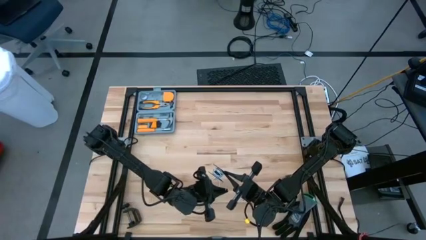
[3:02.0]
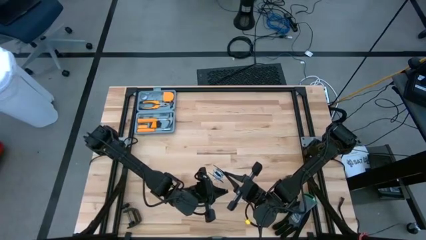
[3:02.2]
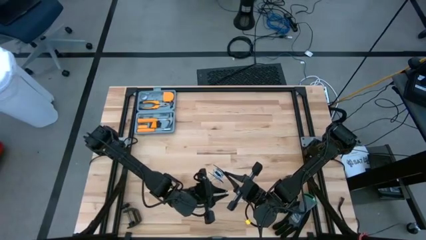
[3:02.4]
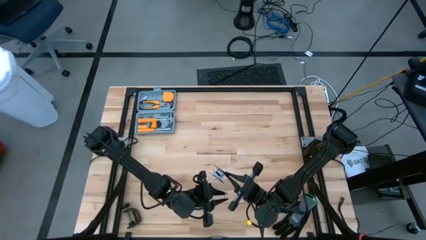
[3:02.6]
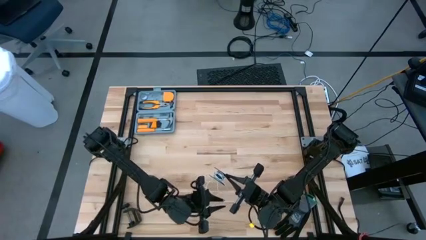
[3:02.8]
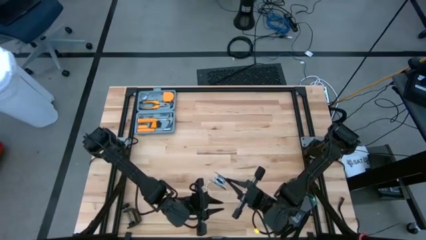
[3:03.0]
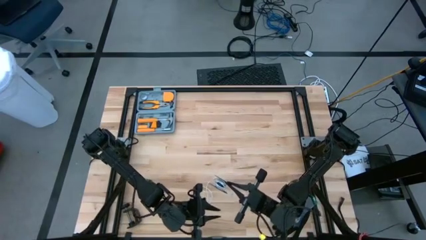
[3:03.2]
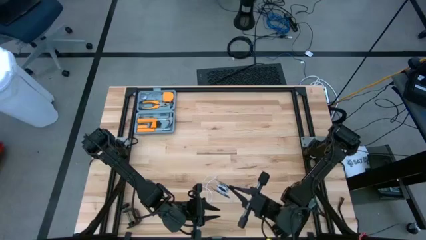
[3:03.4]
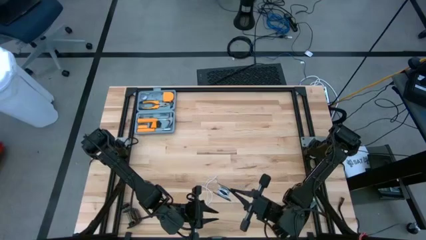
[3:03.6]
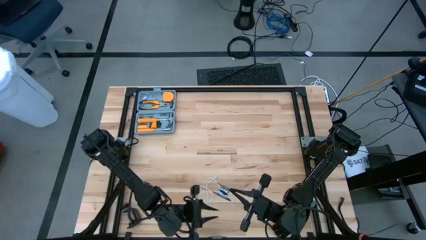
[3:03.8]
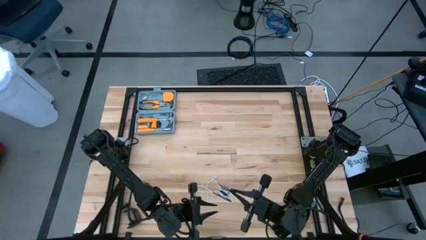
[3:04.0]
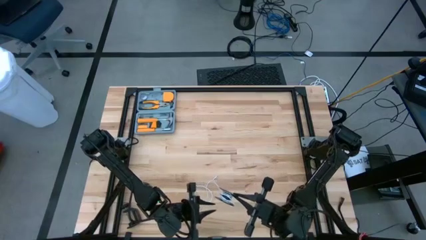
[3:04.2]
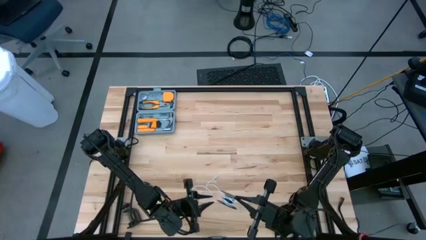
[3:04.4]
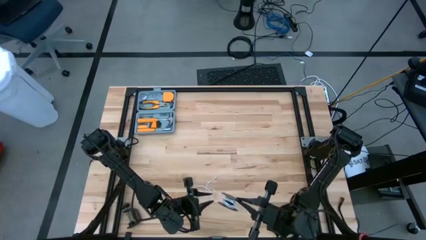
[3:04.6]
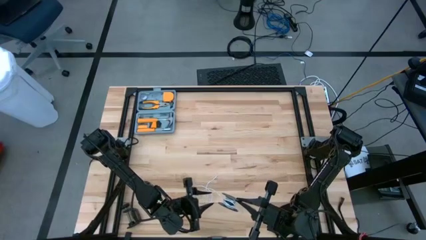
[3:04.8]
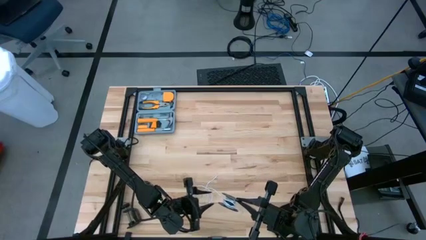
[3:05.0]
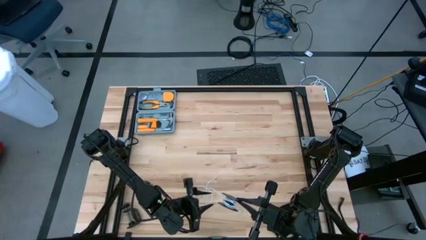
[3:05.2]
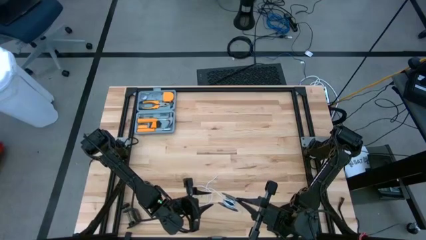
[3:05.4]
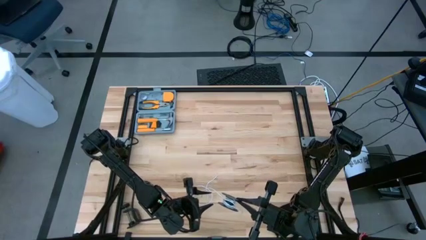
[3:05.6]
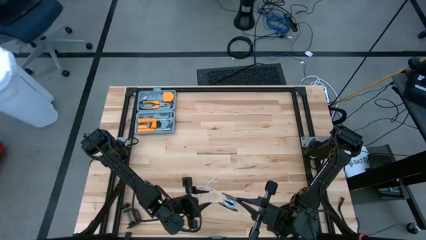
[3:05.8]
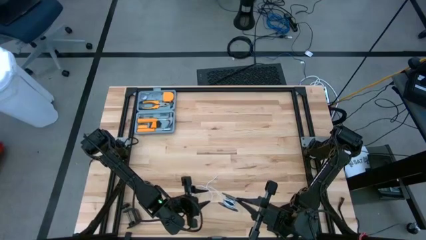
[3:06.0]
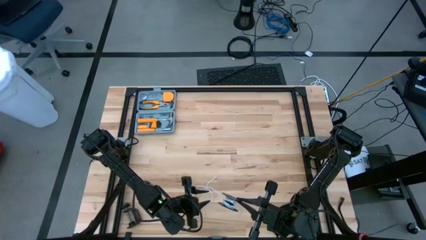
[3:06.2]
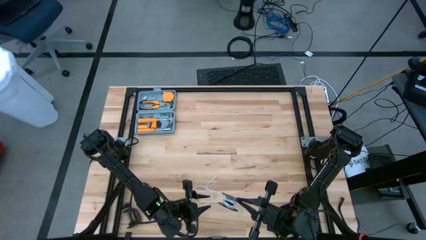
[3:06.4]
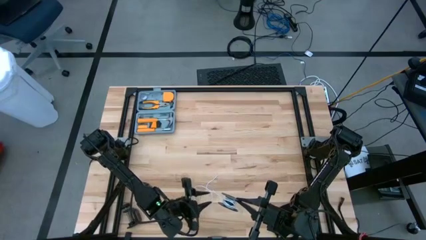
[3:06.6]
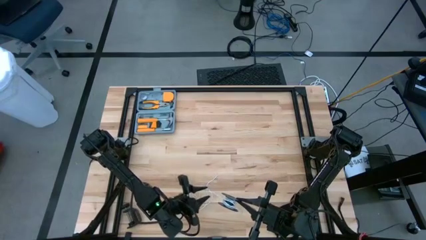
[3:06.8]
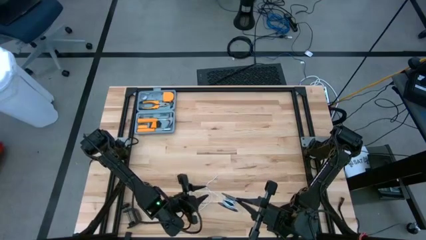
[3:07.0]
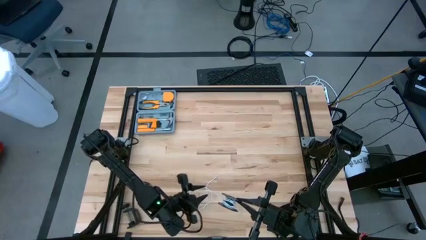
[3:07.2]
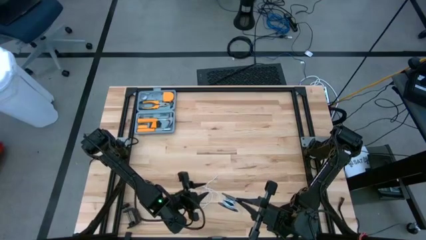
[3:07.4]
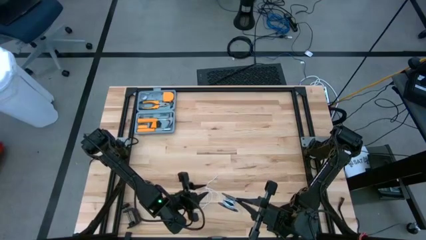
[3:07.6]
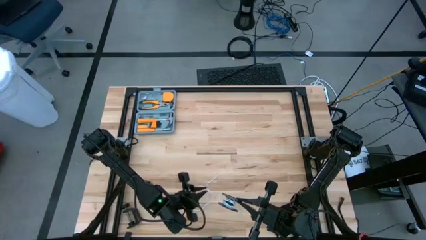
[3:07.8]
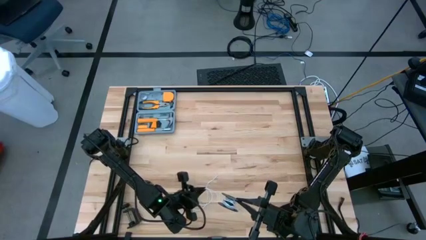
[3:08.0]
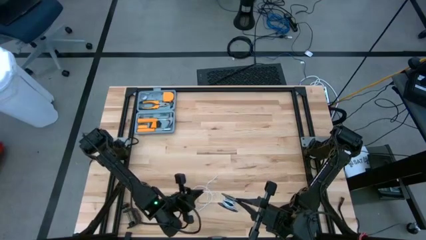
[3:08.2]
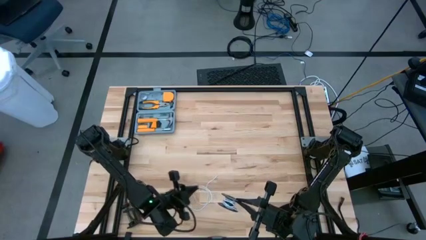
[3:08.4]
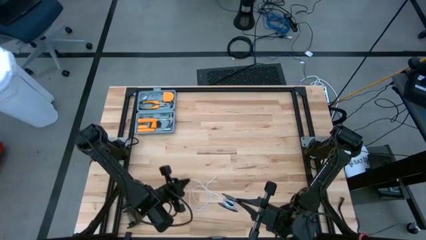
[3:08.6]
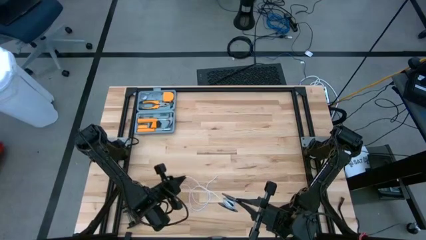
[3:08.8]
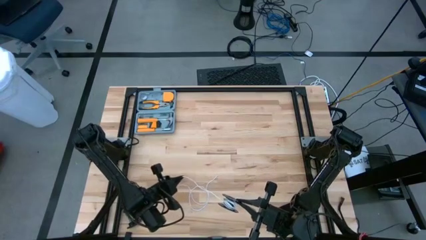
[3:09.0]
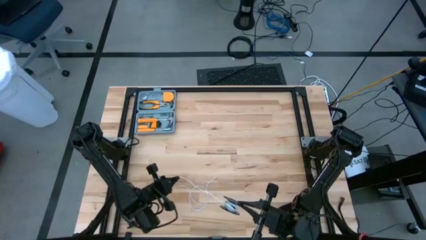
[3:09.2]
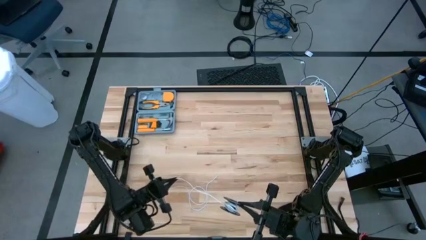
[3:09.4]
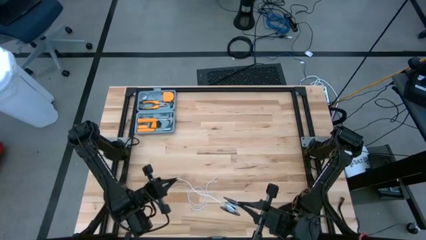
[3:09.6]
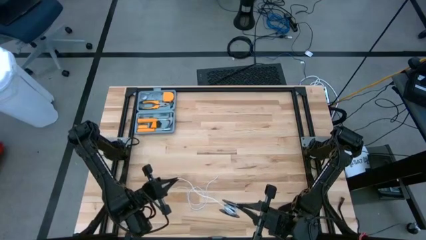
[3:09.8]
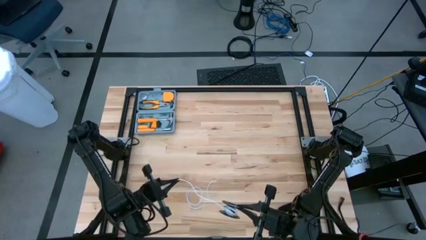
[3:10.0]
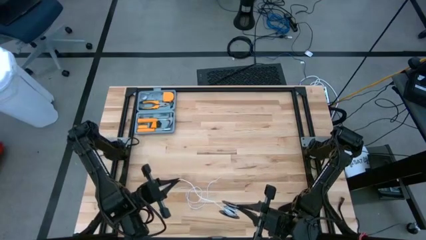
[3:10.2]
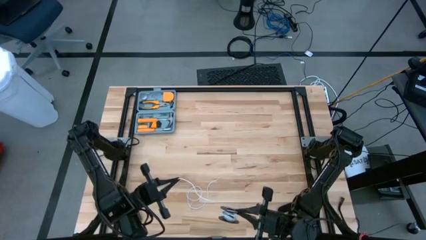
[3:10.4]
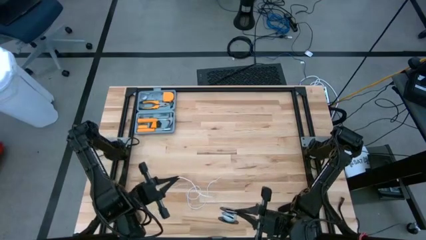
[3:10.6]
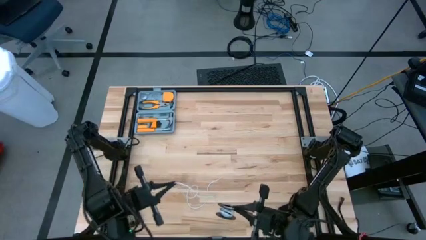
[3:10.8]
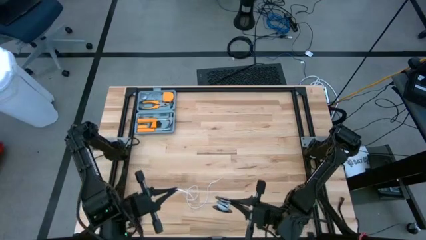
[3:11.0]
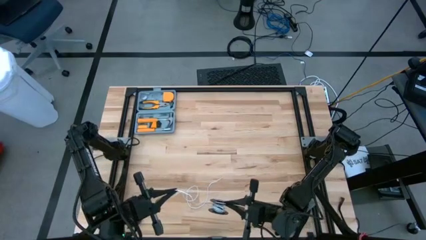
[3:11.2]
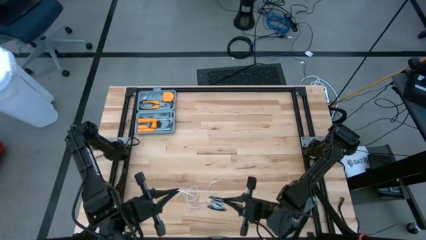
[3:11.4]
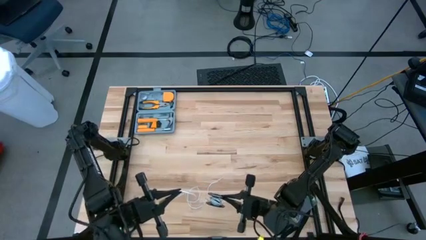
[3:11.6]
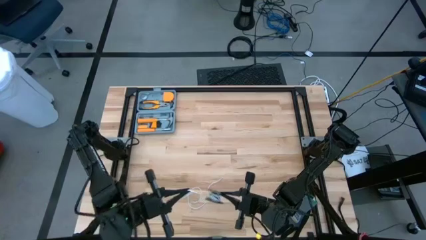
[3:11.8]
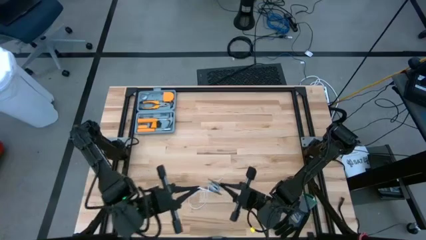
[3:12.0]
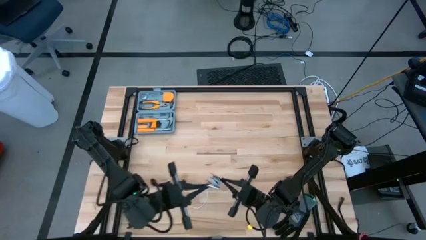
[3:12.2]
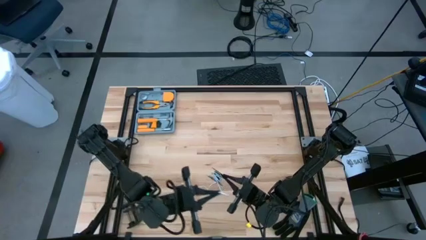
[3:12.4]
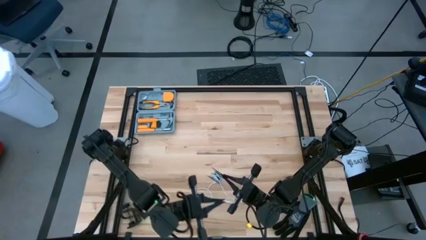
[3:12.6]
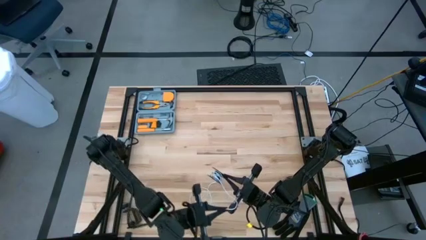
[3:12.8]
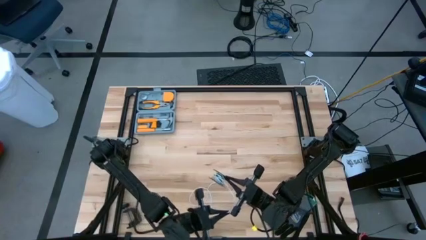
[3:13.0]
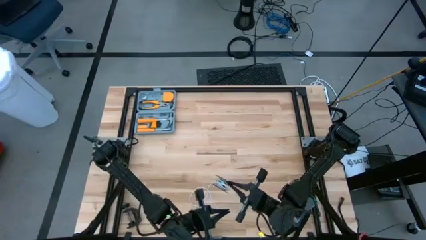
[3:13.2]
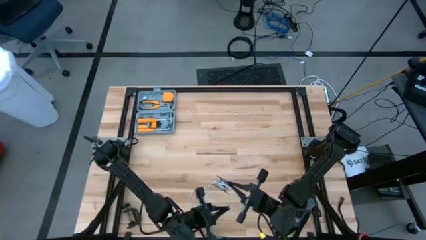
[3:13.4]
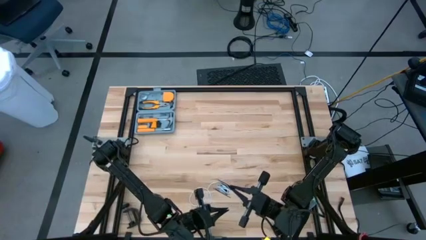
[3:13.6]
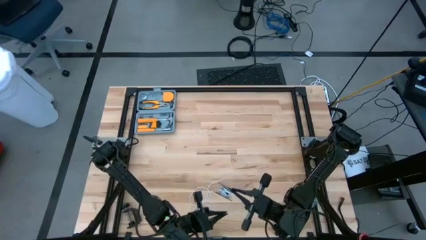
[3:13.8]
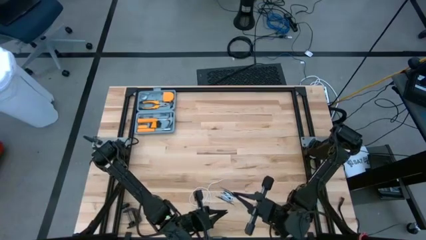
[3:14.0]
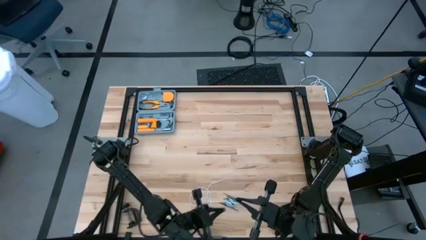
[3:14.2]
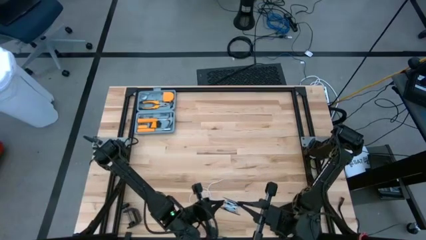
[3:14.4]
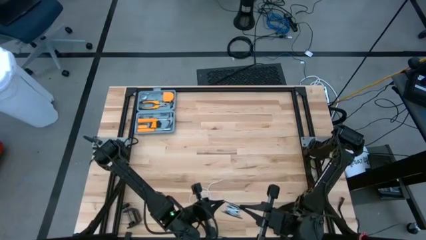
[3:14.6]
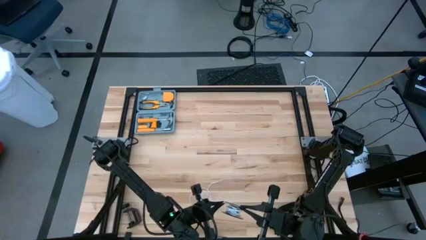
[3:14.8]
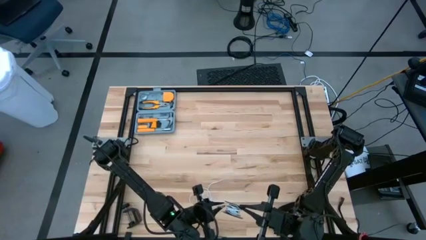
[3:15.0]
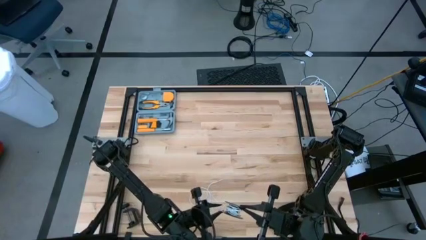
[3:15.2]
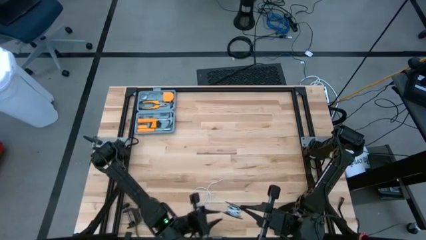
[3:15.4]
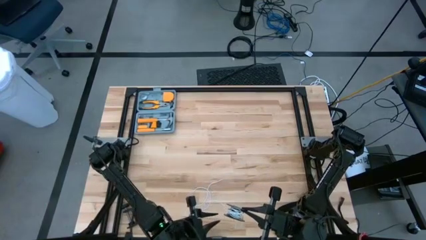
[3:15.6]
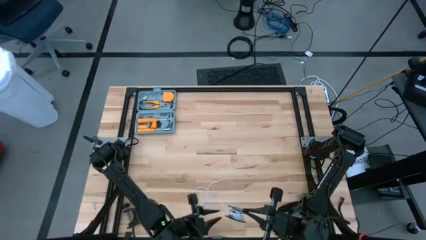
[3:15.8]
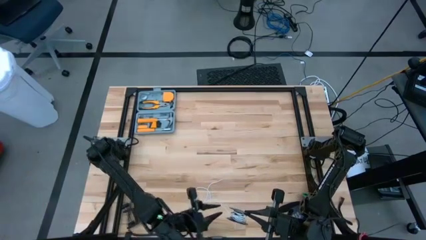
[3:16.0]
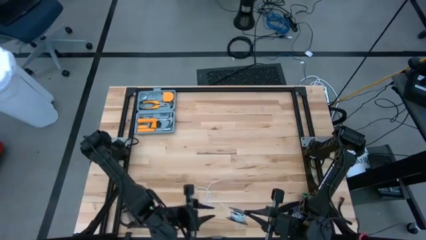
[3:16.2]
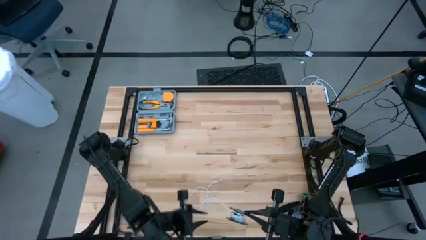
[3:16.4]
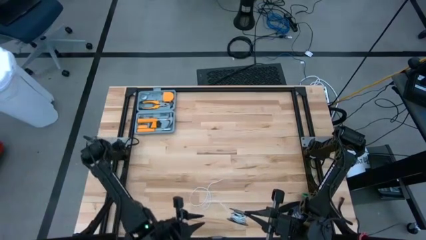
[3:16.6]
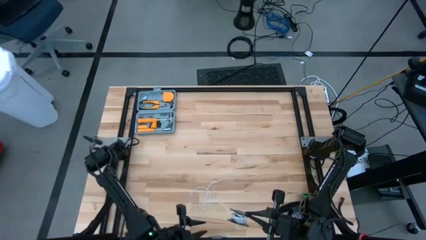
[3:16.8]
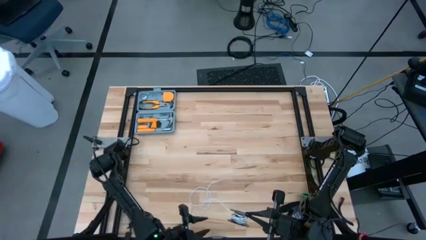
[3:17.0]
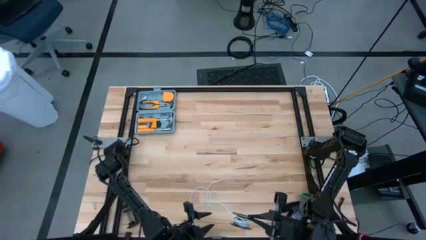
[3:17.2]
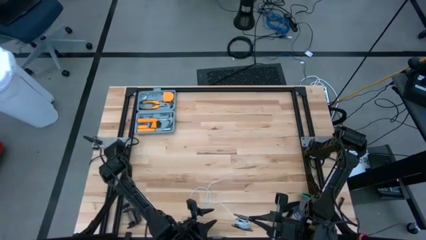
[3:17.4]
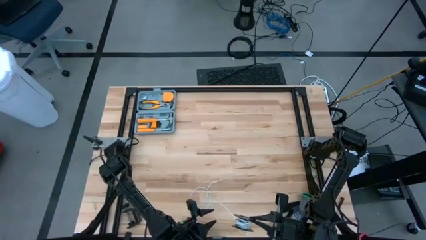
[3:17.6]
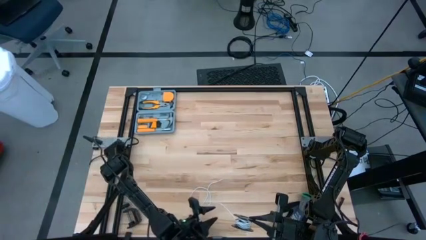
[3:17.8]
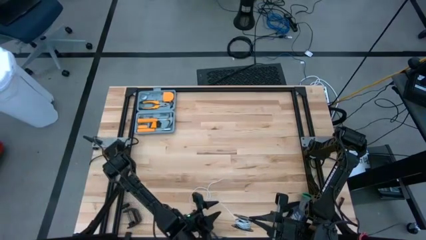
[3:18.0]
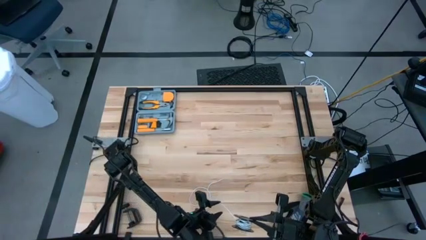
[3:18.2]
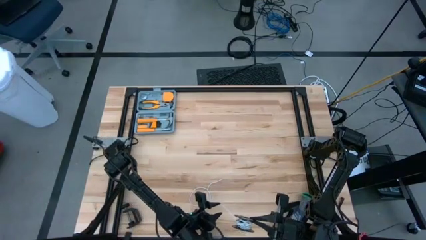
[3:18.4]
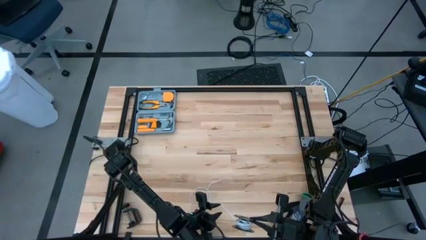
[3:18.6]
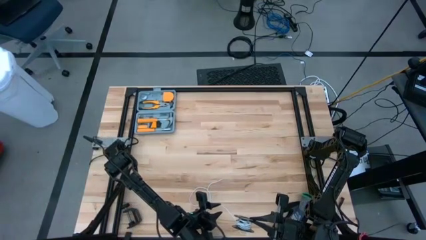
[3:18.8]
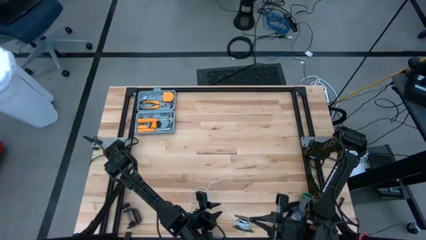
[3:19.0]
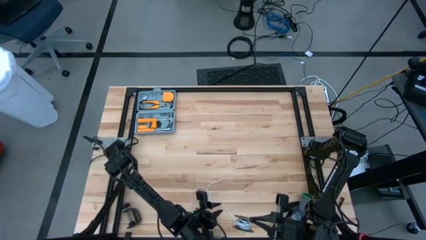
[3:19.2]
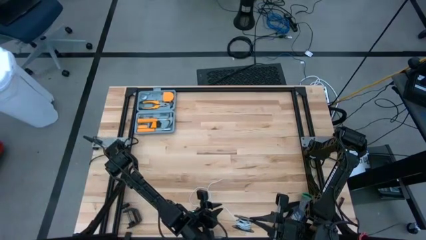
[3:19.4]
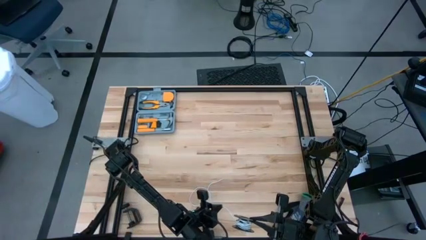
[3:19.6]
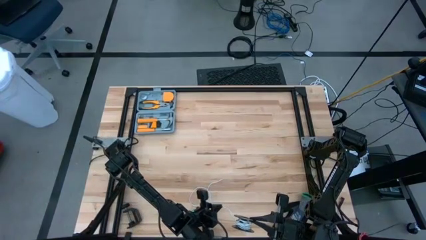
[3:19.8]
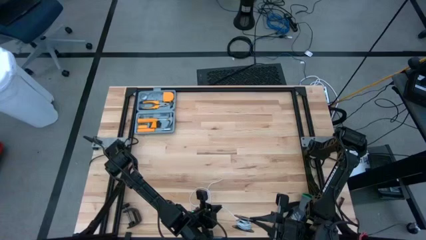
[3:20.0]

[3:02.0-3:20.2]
Task: Coil cords
Coil the white wire on the spool
